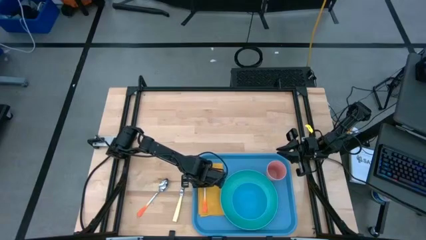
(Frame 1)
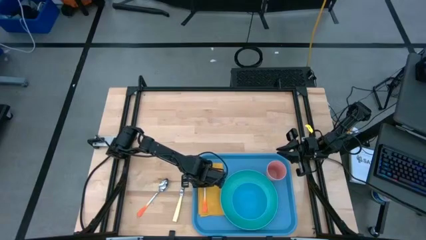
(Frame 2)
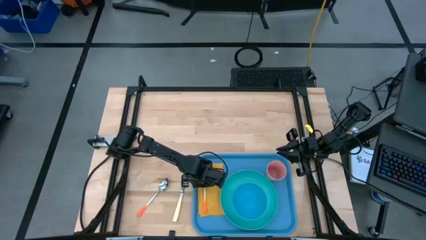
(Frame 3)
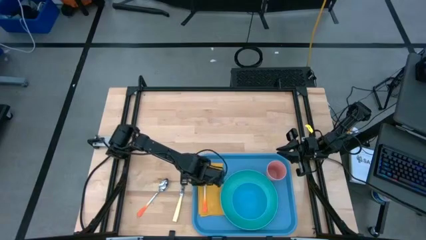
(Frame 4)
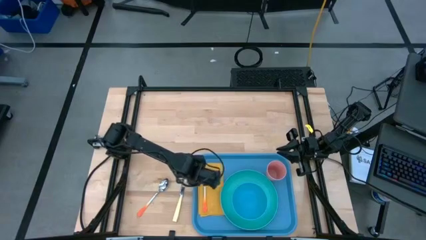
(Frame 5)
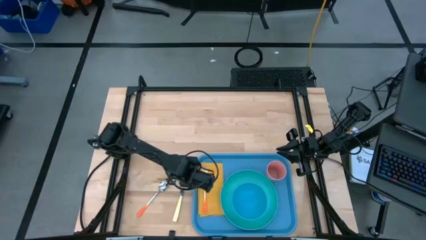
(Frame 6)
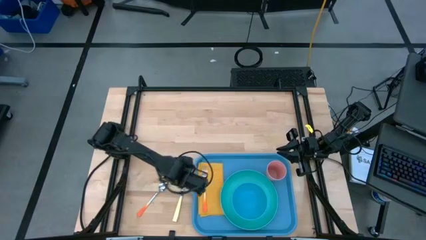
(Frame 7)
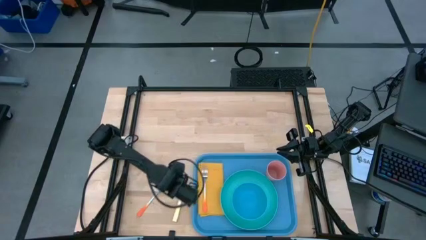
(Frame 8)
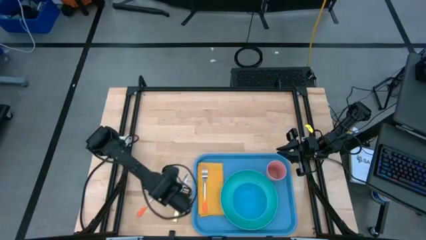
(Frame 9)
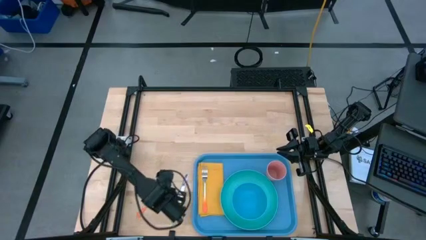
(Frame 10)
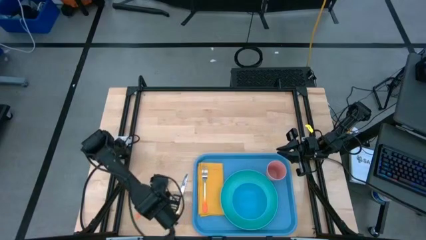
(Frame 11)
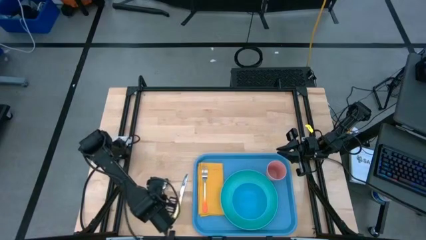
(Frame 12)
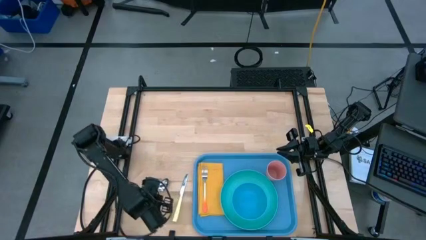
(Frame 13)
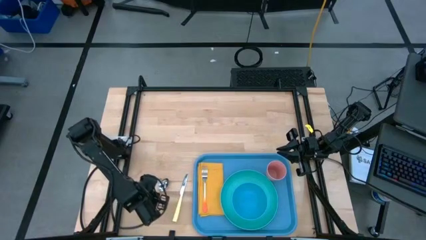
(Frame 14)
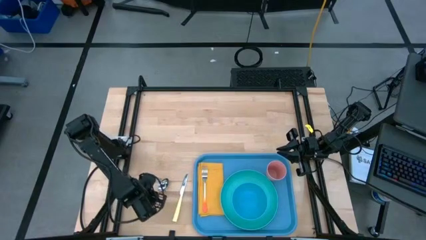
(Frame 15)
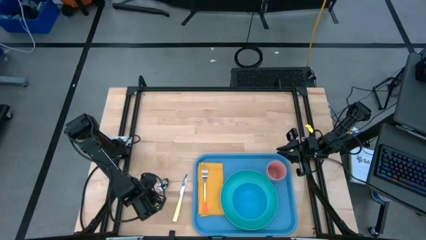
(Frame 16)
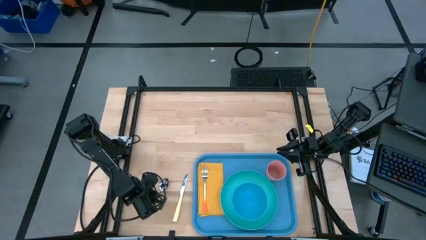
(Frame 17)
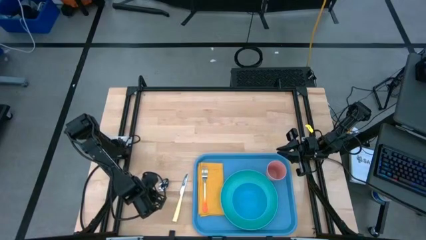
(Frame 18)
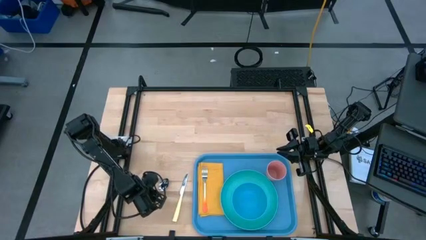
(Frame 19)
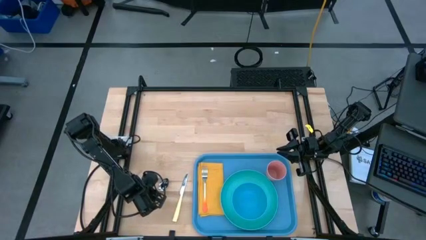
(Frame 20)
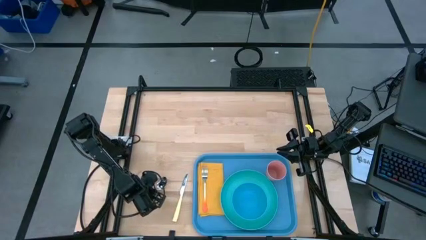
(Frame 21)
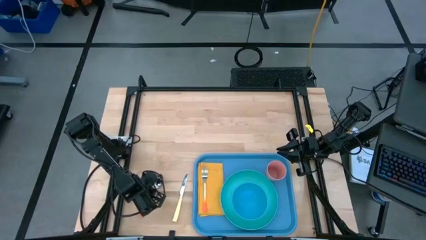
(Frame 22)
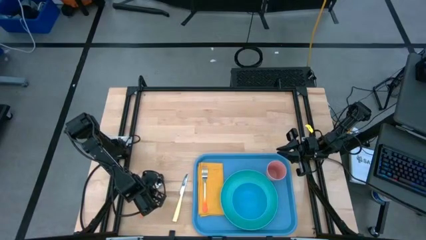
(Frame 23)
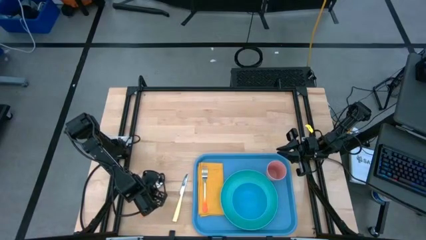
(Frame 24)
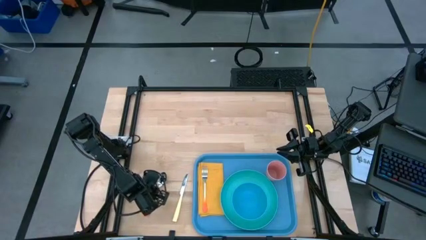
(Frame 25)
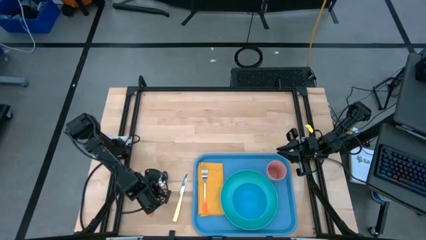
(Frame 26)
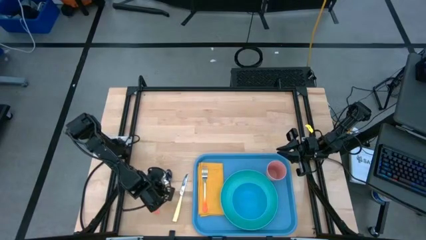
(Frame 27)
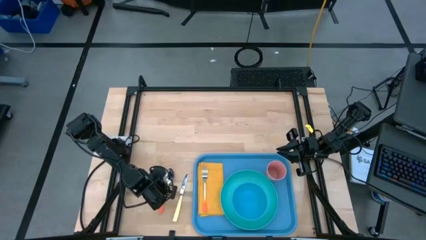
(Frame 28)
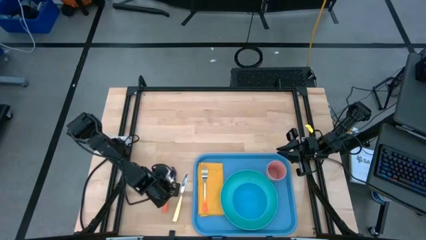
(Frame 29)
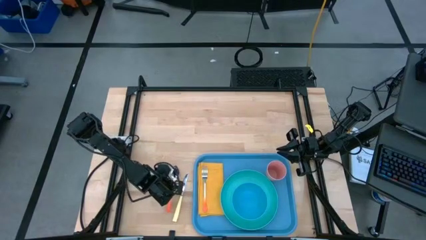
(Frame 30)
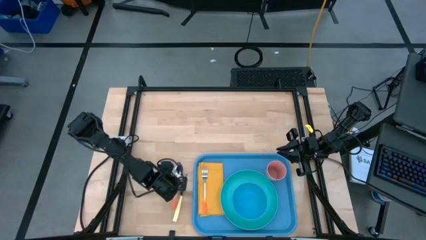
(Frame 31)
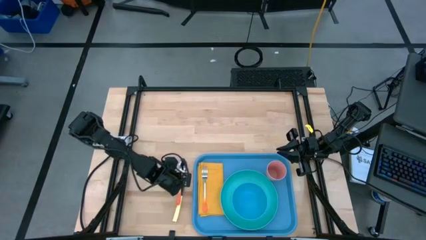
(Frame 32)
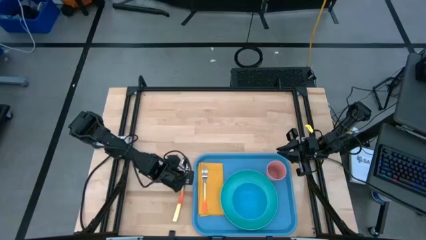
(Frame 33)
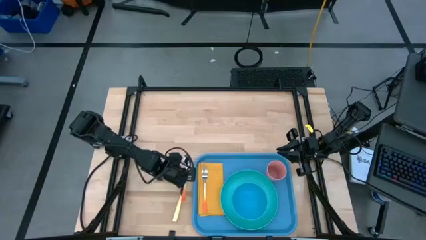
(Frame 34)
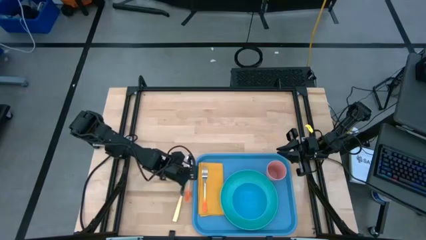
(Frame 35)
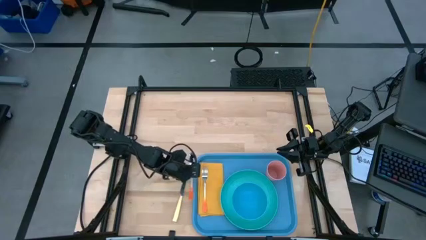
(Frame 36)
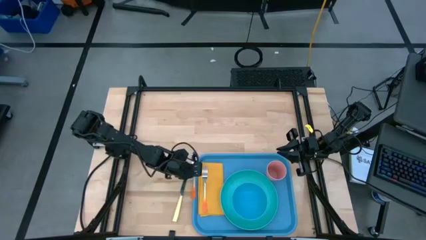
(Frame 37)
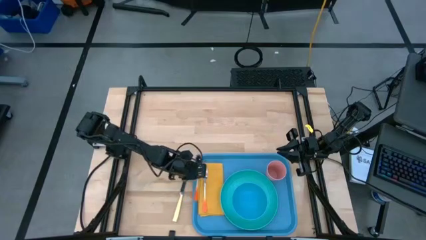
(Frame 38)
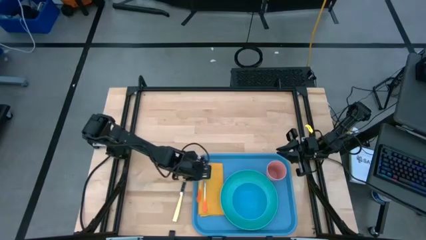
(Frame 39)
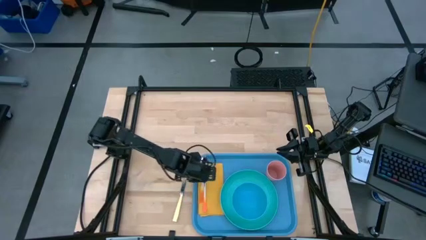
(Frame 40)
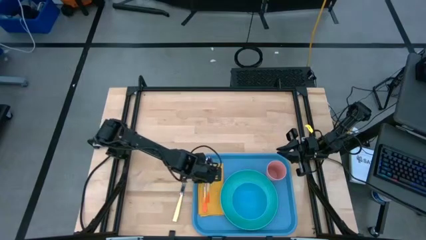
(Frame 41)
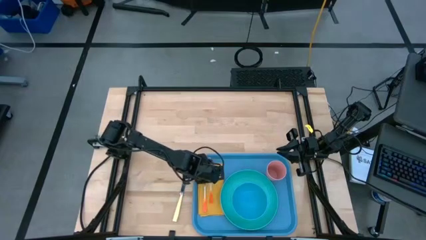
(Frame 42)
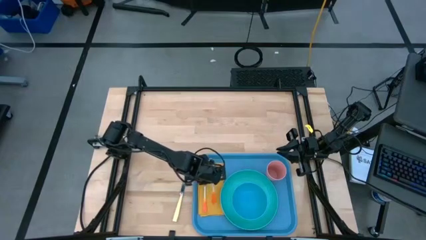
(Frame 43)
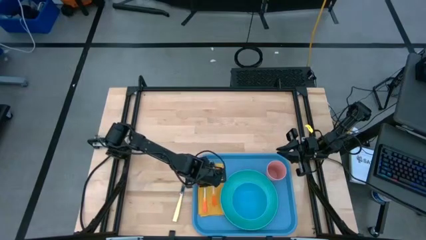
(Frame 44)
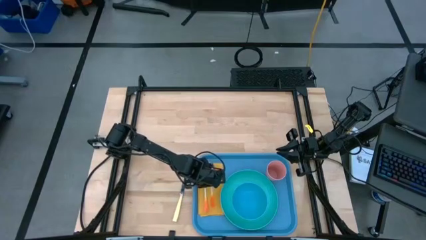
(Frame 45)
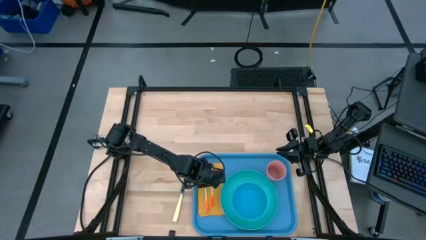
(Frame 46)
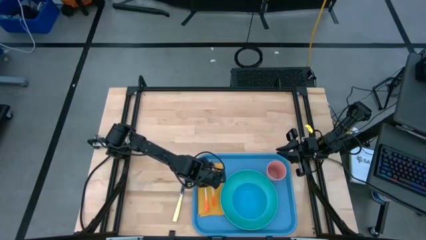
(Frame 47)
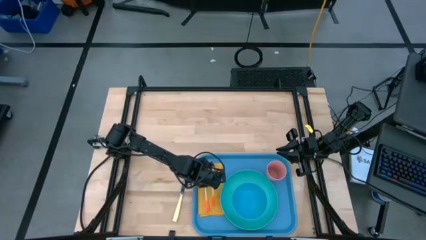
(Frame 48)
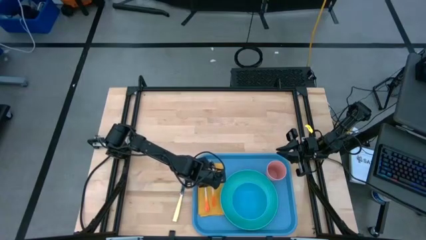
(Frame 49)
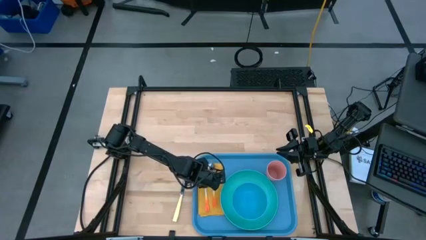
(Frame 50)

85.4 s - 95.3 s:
Task: Set up tray
Put the orange spoon on top of the yellow table napkin to the right of the orange fork

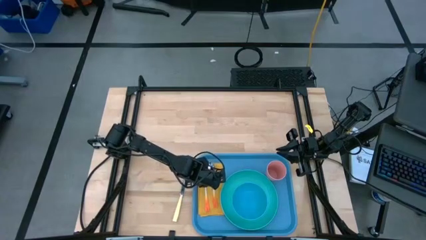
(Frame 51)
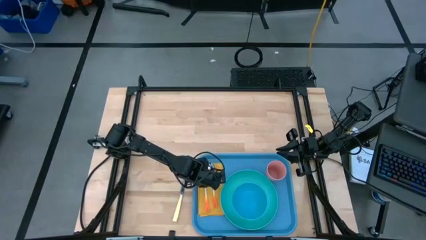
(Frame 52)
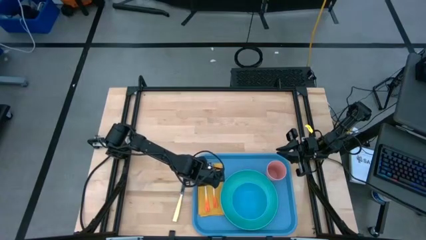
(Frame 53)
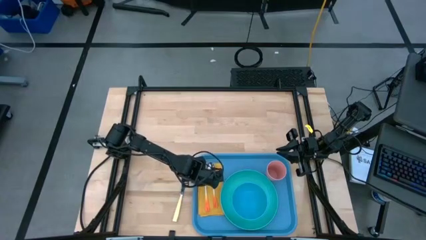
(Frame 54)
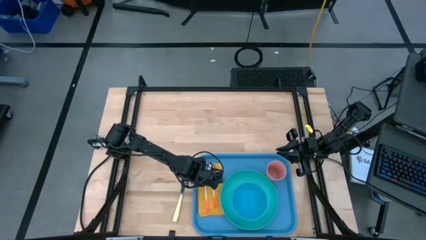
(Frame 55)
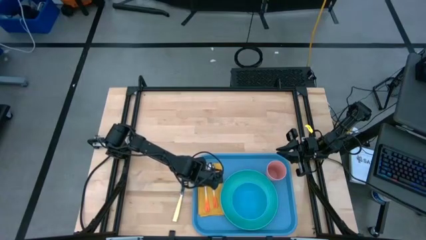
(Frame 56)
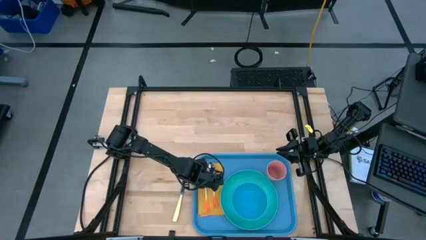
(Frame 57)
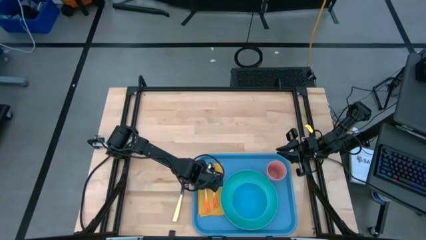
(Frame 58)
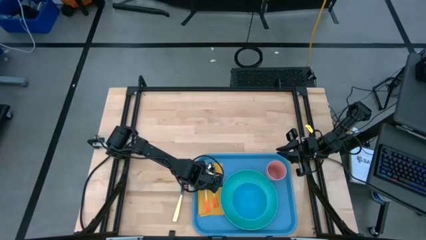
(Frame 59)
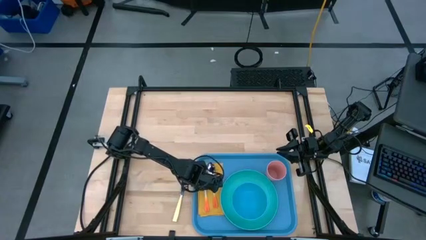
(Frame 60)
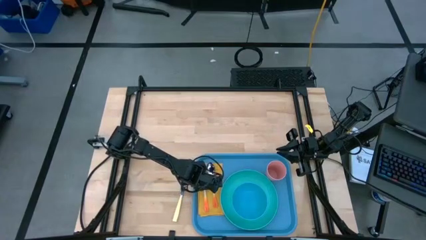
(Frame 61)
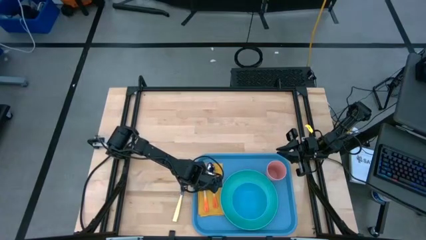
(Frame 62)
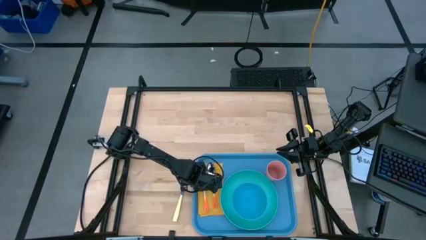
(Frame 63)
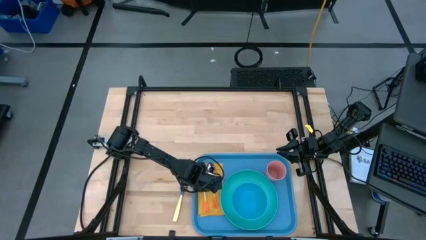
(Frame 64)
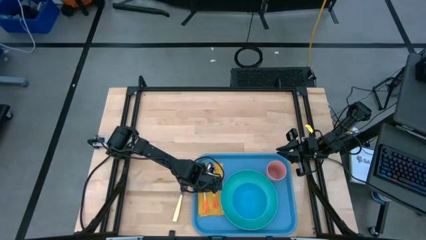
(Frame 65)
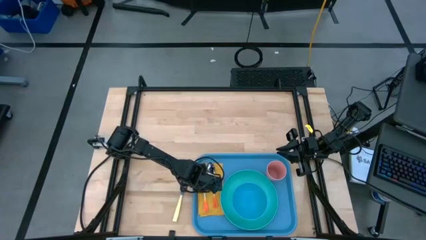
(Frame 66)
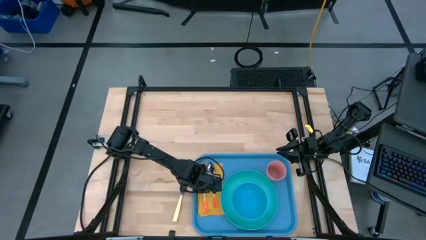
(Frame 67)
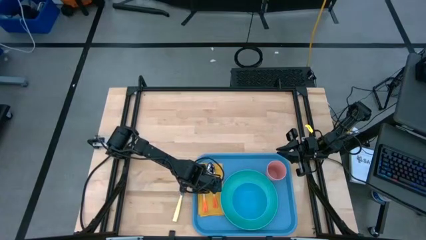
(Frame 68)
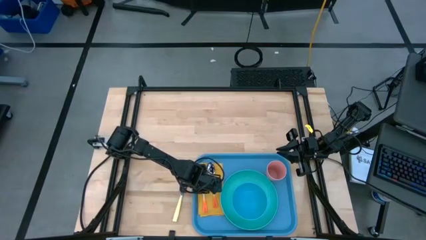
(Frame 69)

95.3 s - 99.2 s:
Adjust the orange fork on the yellow table napkin

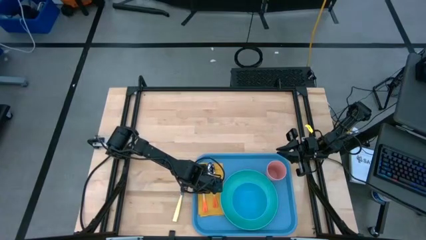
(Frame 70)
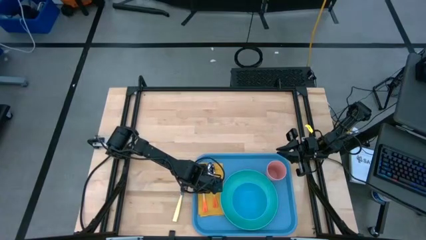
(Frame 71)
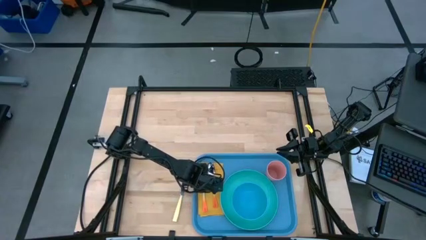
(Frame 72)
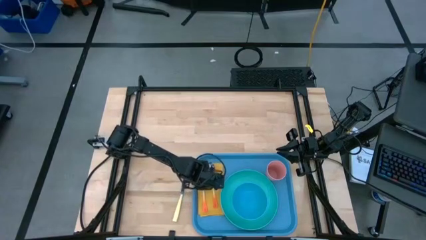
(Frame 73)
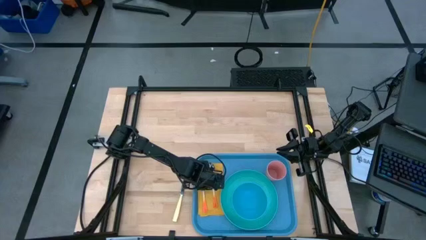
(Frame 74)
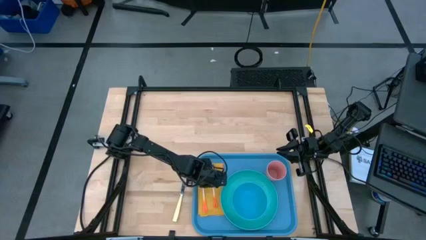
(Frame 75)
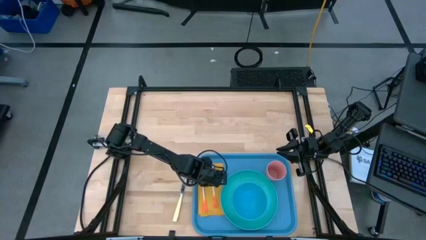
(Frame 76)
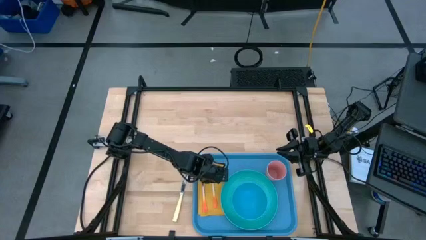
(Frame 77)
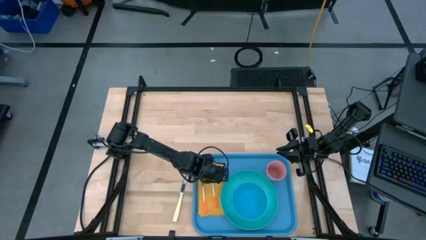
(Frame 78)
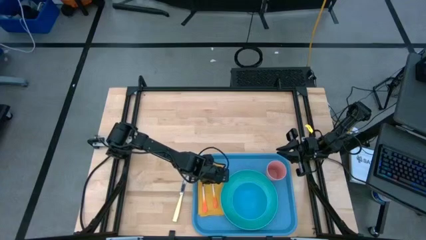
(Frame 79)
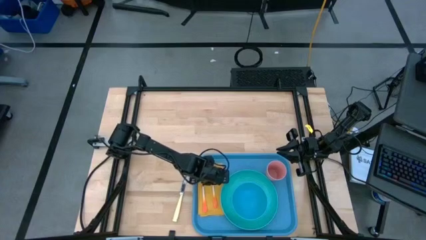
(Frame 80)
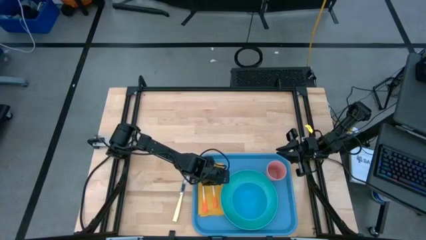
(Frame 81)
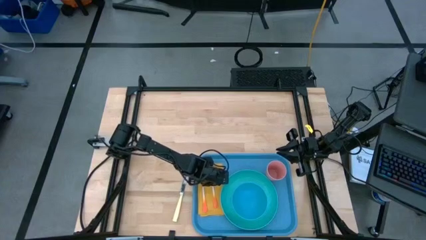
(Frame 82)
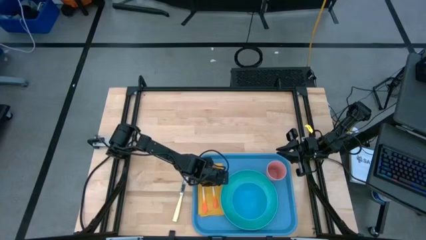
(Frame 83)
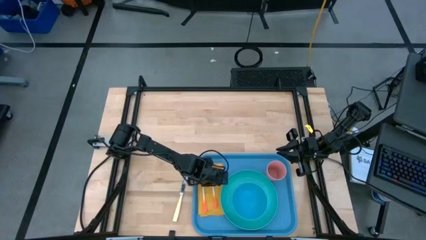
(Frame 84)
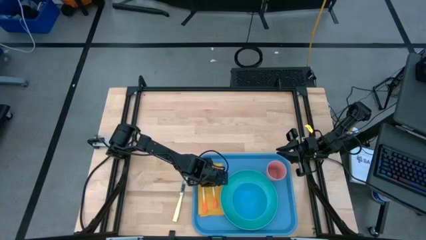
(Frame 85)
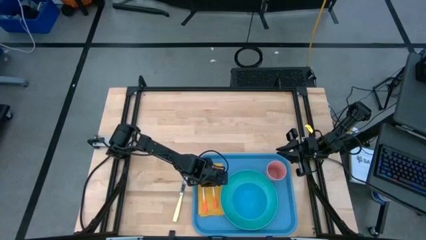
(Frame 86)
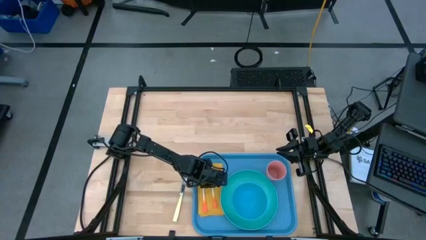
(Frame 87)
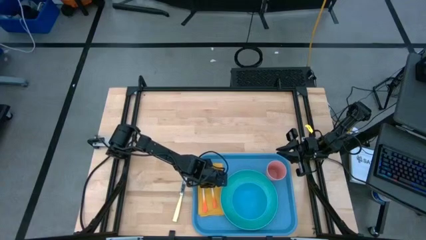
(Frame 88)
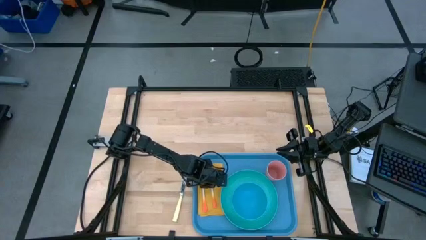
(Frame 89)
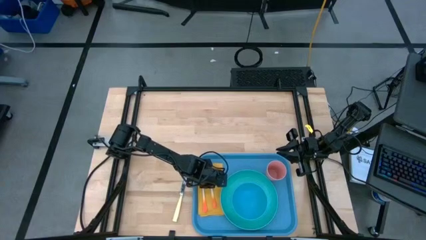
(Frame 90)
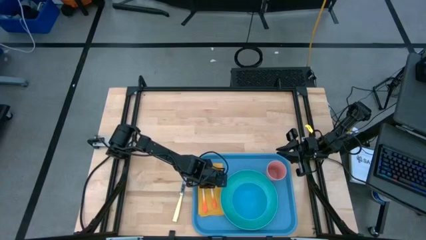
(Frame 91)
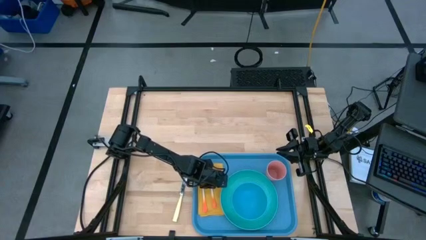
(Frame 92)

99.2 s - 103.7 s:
Adjust the orange spoon on the yellow table napkin
